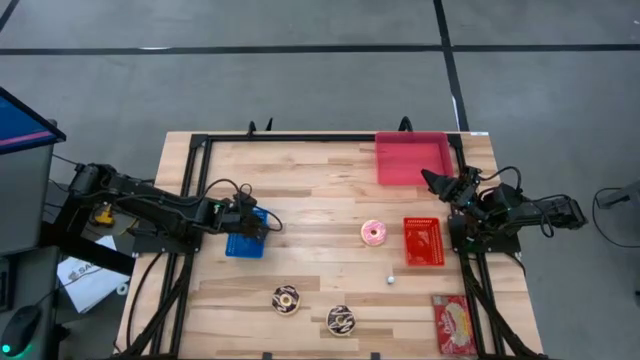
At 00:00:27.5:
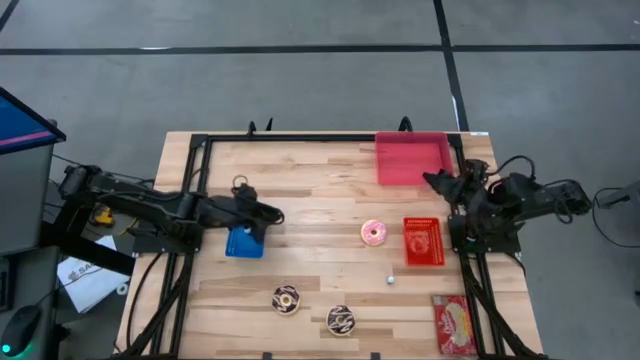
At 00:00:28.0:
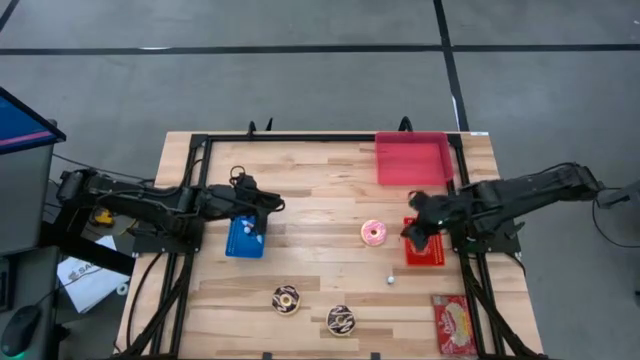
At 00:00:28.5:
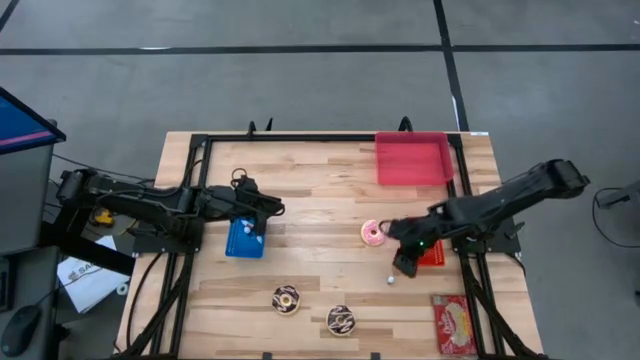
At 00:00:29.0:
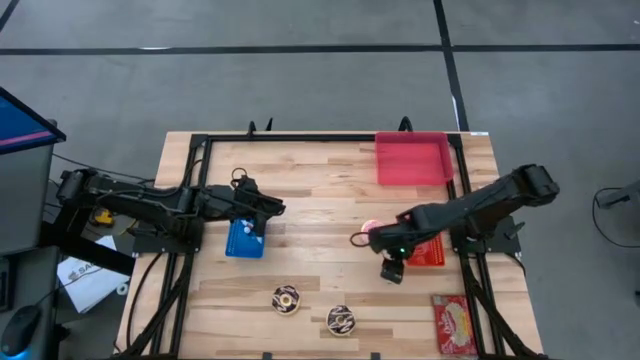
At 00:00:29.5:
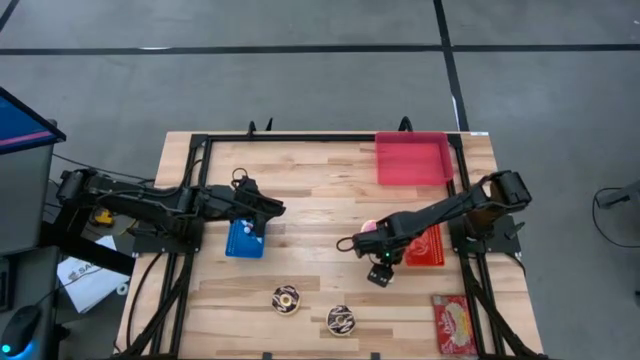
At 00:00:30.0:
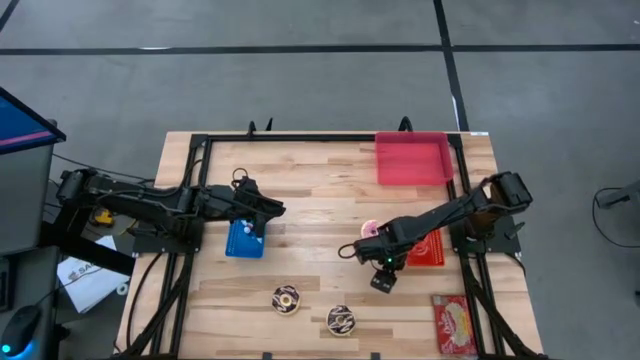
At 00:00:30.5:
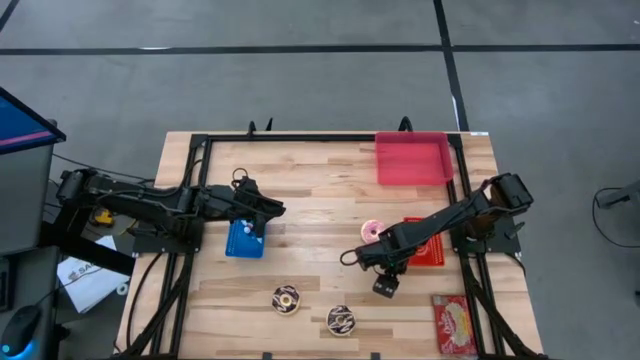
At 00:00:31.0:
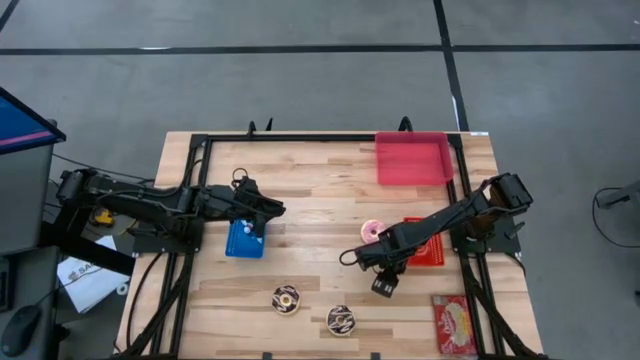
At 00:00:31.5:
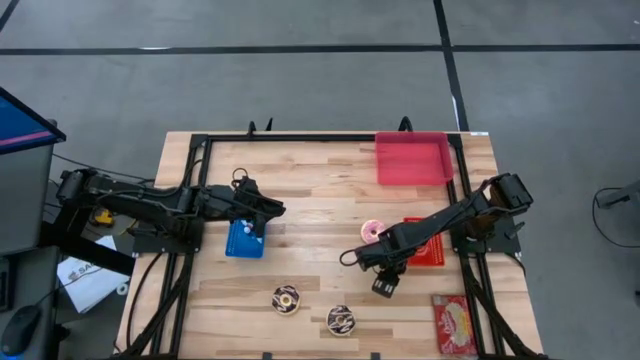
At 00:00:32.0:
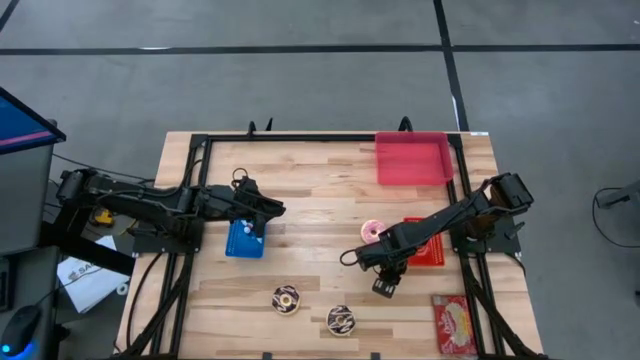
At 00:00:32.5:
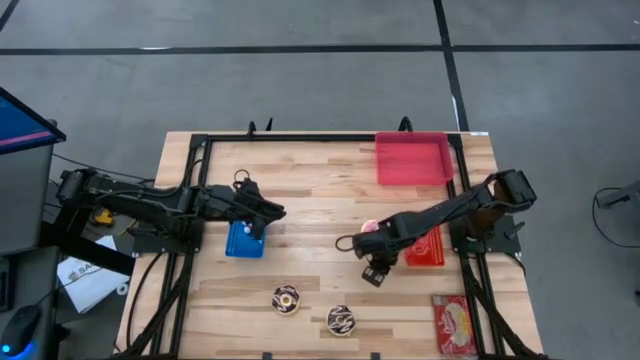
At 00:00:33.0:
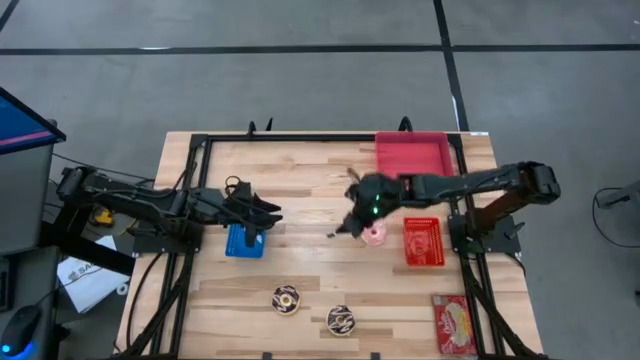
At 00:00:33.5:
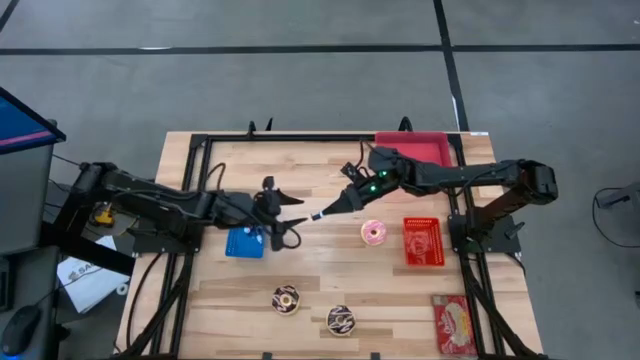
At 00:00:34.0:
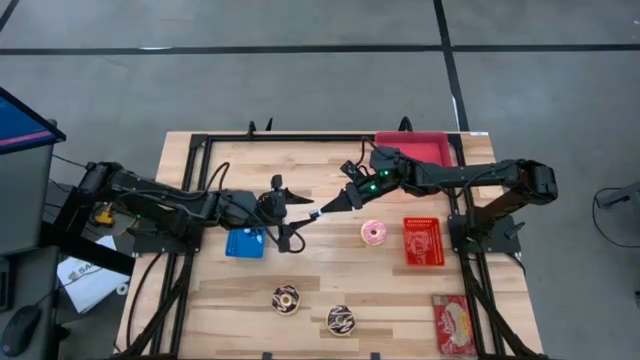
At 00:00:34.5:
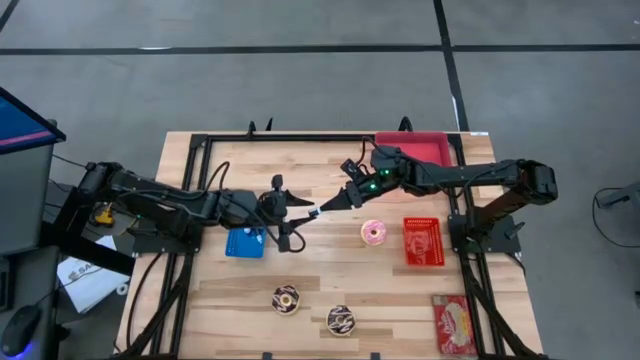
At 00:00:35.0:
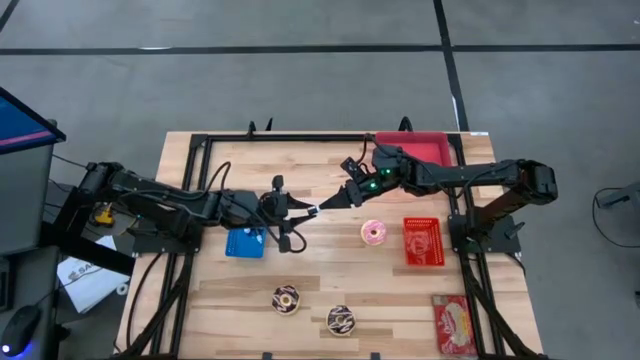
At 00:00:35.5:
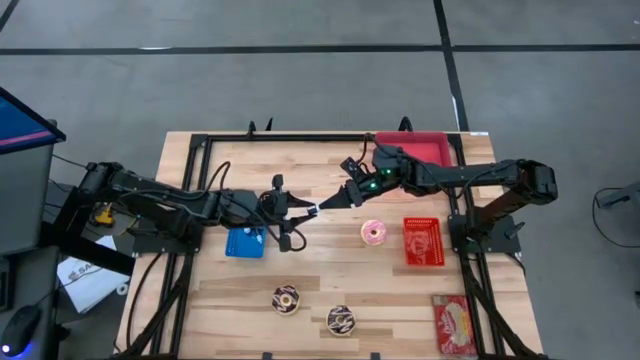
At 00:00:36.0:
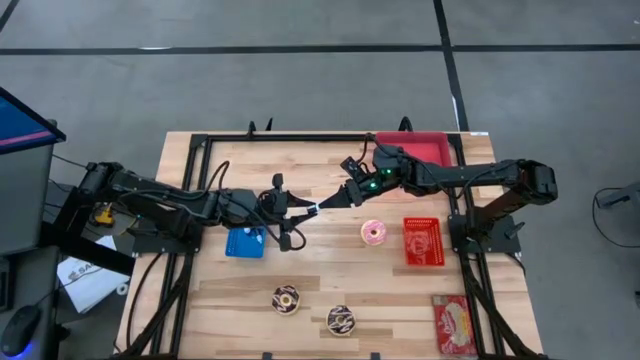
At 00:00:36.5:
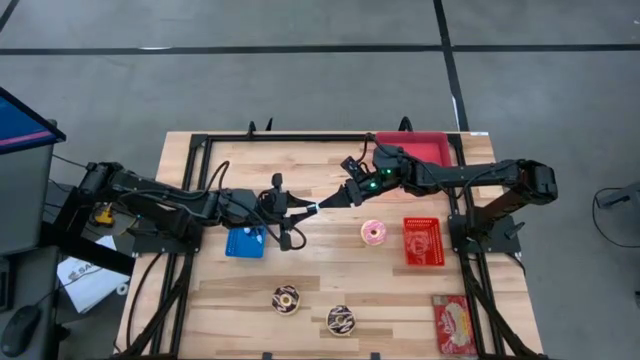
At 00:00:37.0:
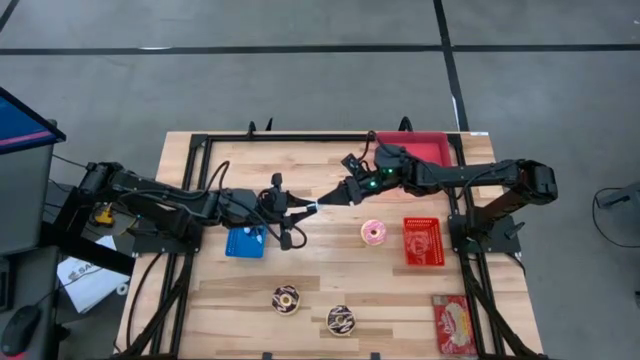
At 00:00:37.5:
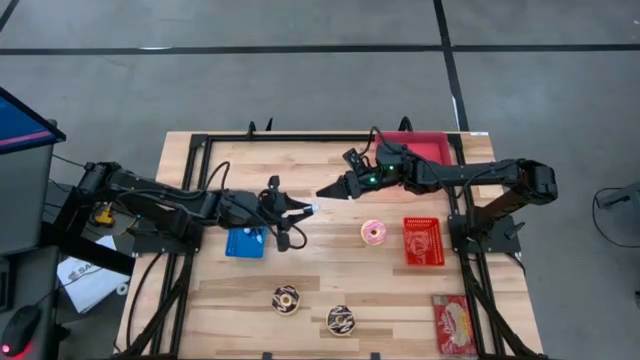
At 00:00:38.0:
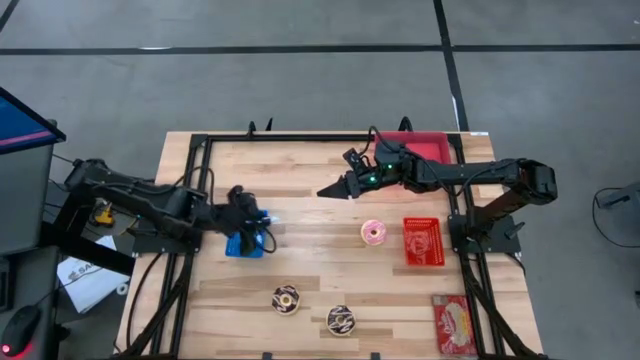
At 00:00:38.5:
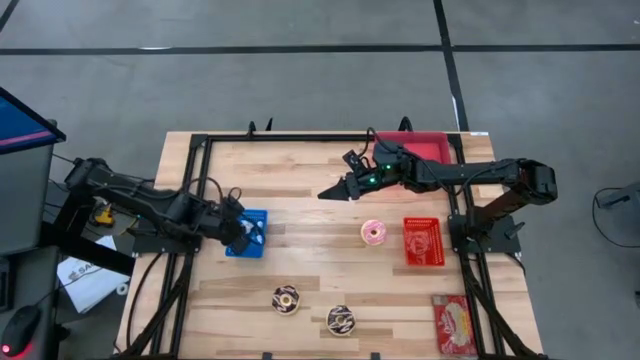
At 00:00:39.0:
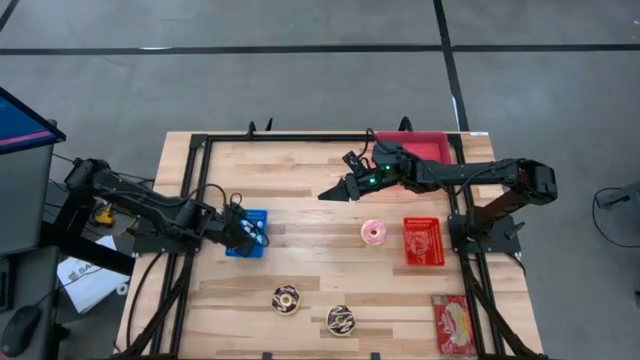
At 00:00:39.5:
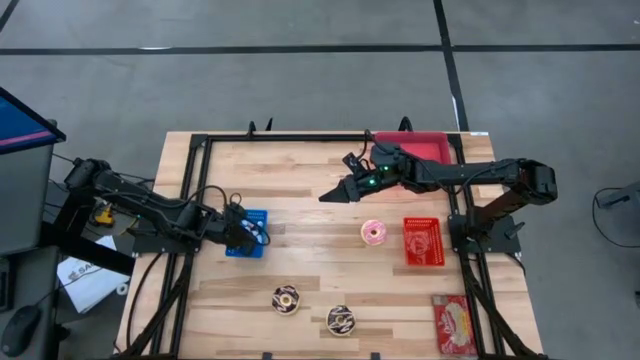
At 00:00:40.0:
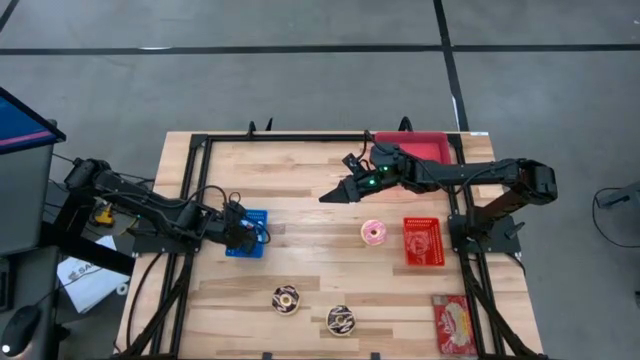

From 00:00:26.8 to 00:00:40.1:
Put the black food coloring bottle into the blue bin

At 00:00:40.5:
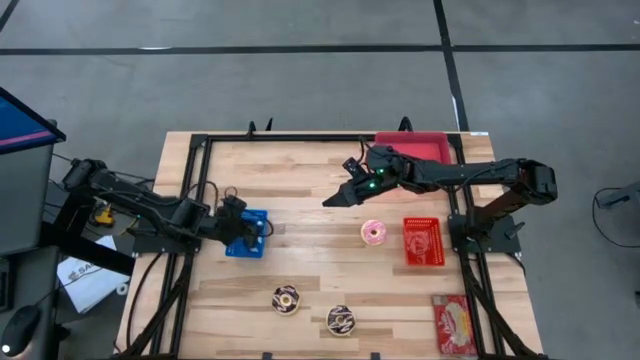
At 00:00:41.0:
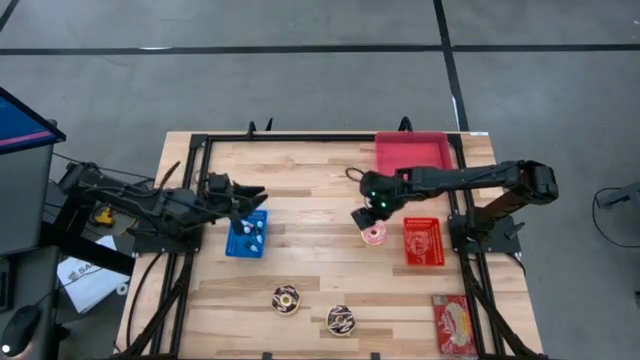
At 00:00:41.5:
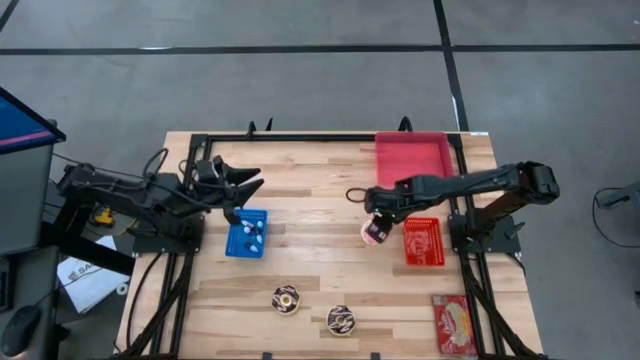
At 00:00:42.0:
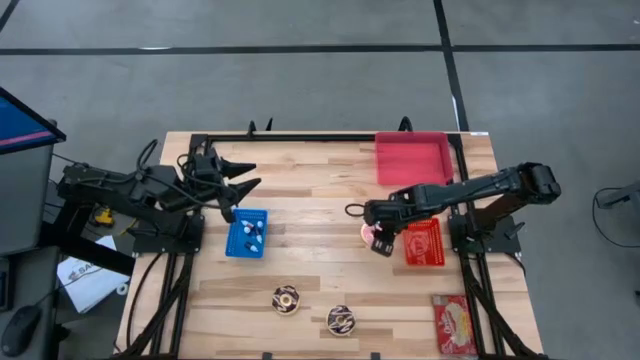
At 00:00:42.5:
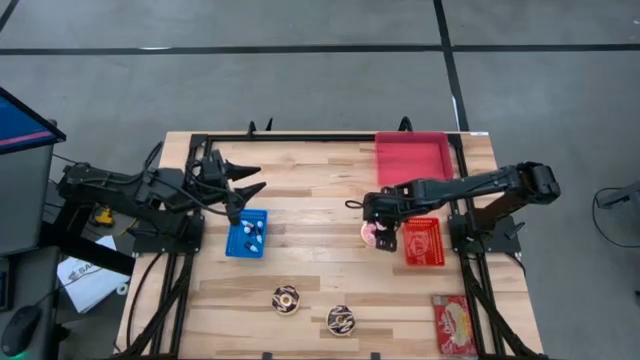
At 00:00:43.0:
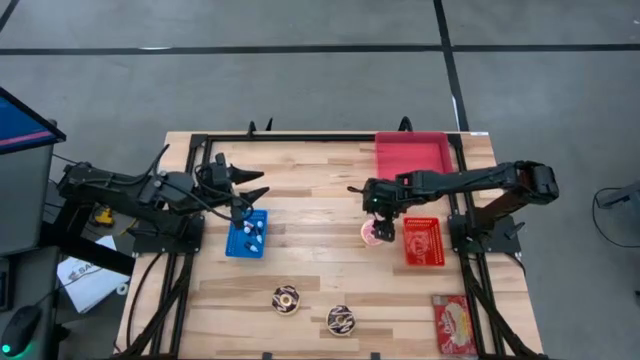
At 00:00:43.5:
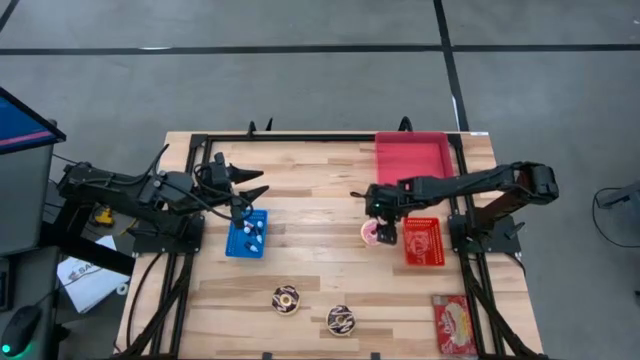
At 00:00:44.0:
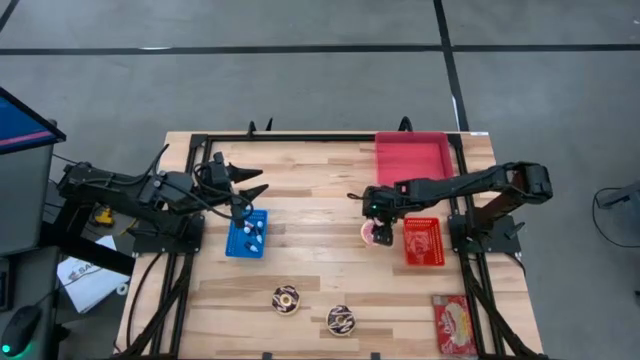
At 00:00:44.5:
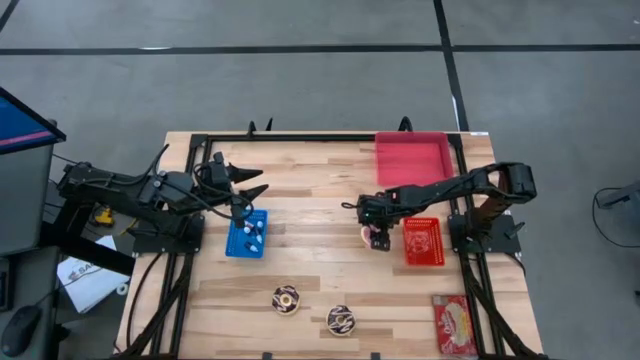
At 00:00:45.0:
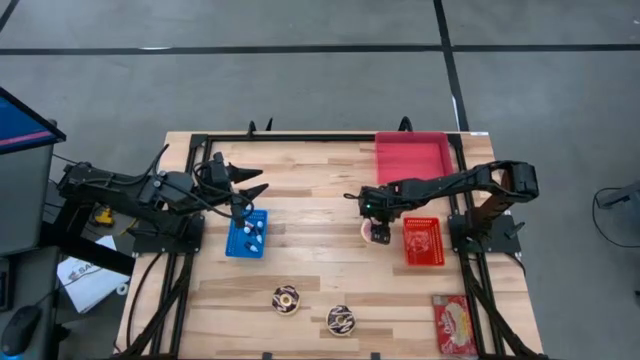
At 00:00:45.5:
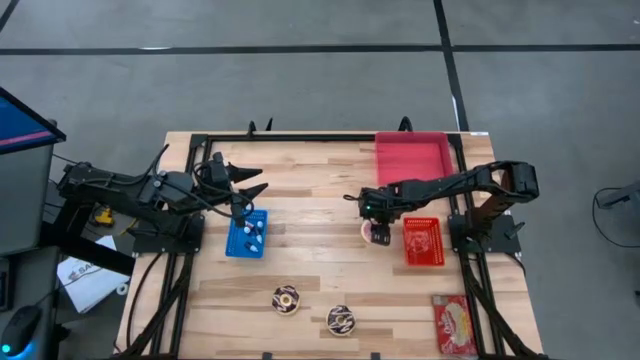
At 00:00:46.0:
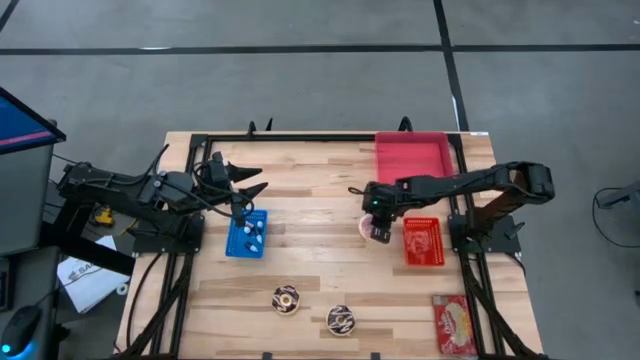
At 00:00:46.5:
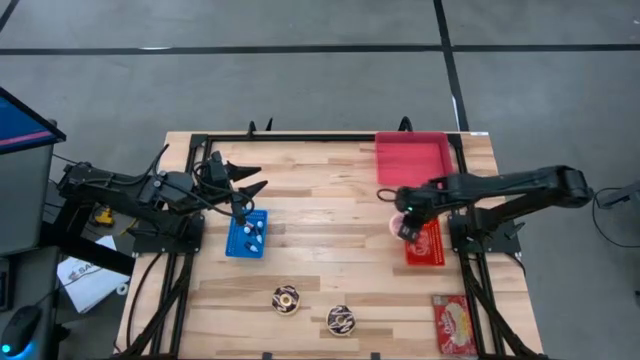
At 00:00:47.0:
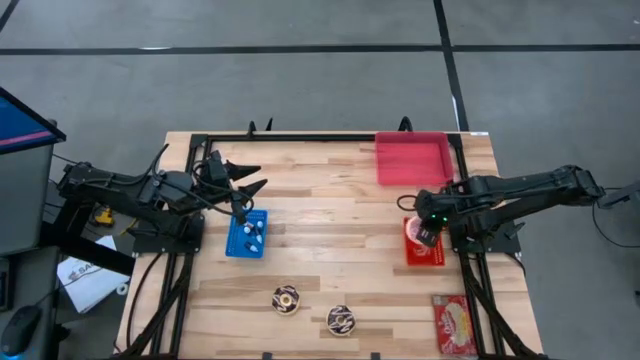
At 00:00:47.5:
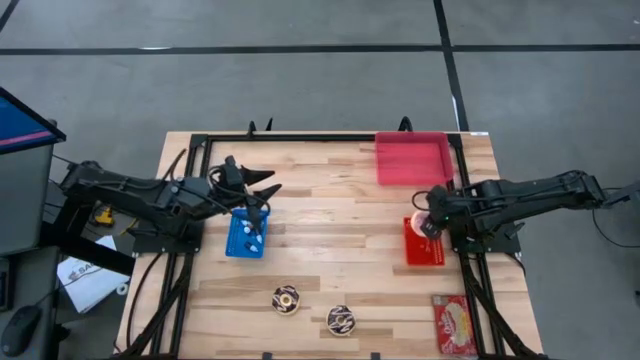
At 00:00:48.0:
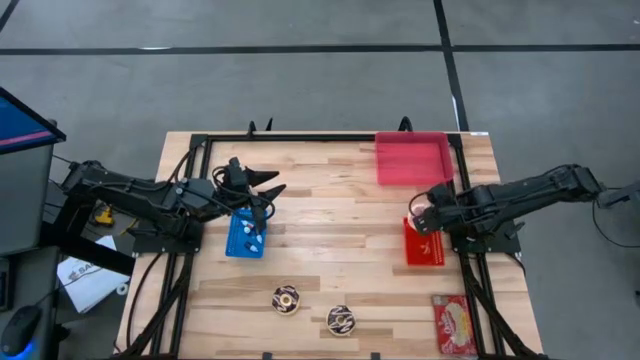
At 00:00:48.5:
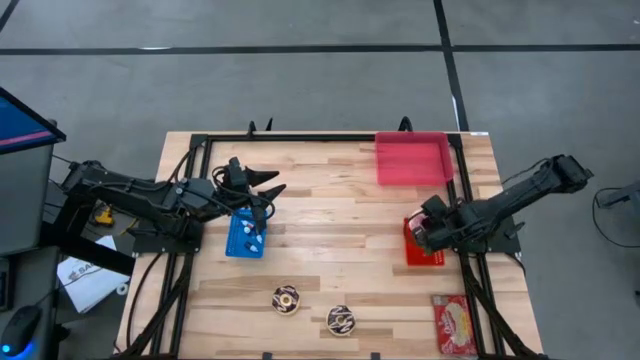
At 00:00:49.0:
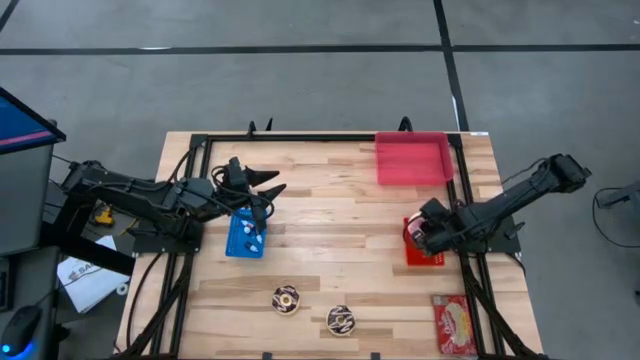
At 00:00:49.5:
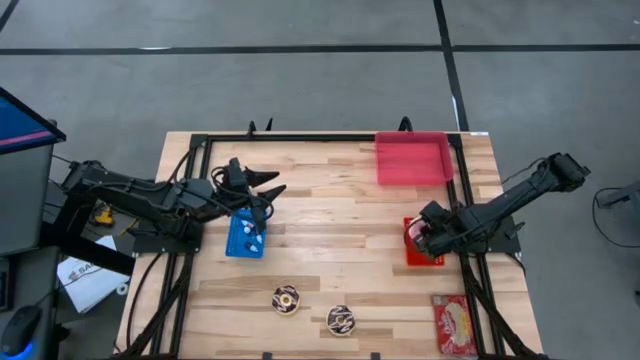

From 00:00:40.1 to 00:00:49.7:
Put the pink donut into the red bin
